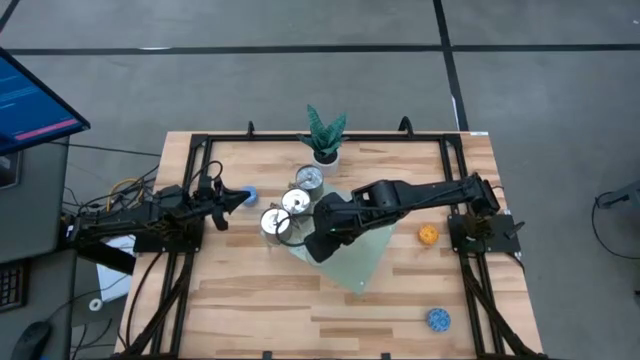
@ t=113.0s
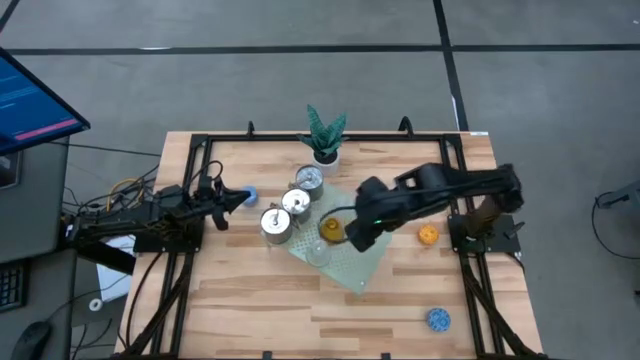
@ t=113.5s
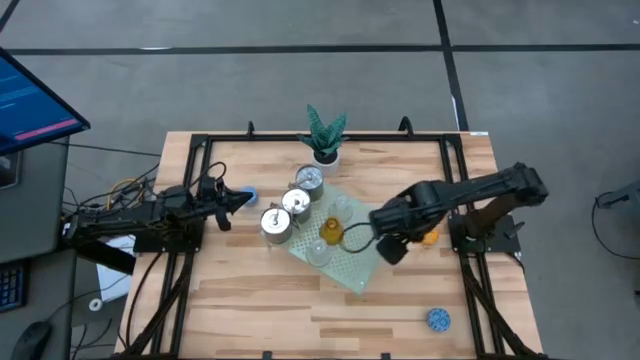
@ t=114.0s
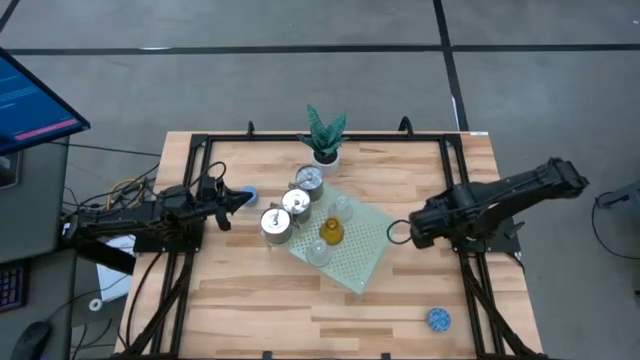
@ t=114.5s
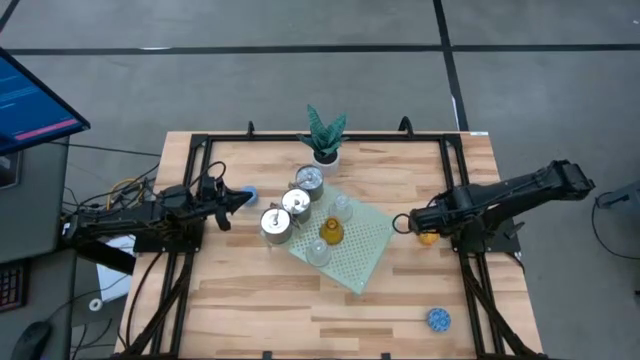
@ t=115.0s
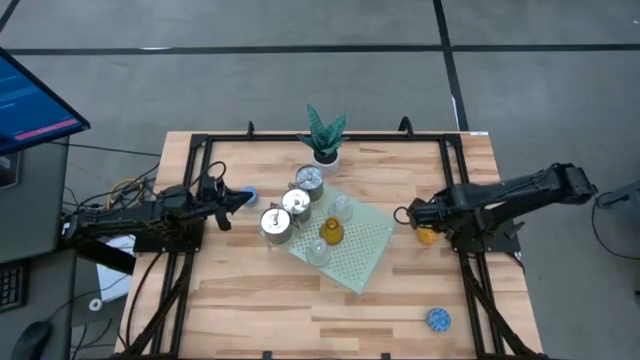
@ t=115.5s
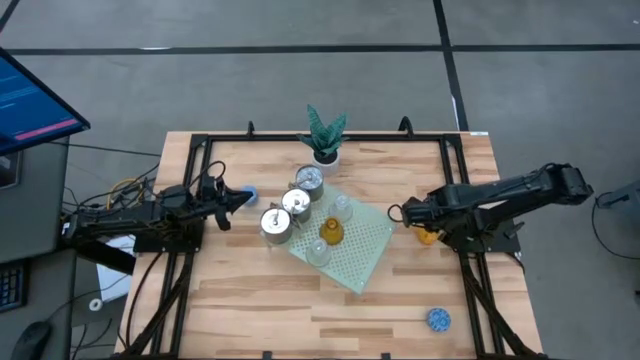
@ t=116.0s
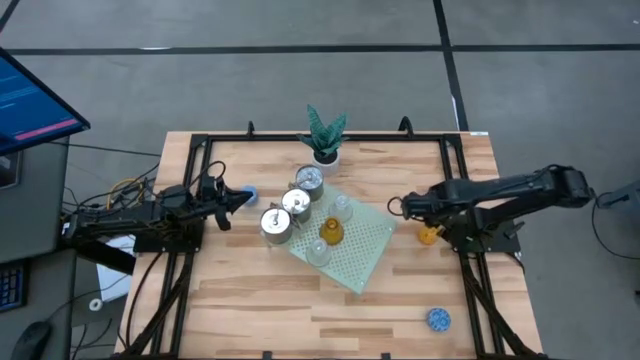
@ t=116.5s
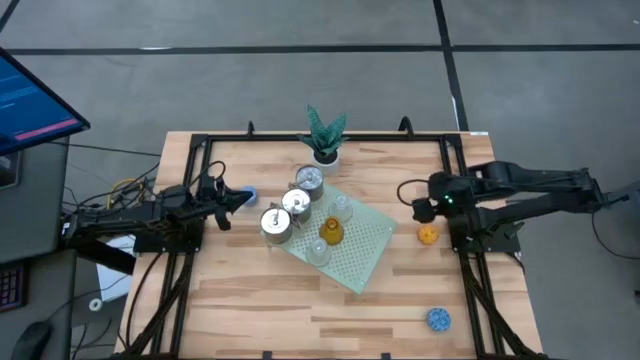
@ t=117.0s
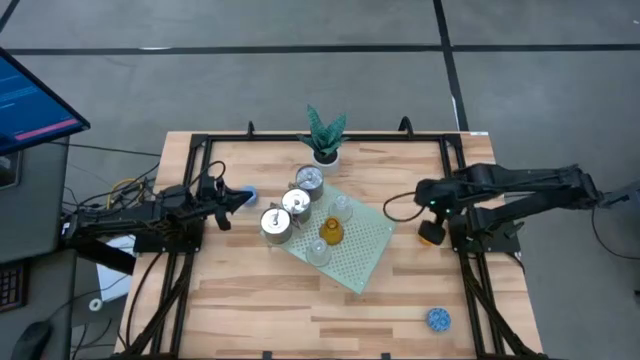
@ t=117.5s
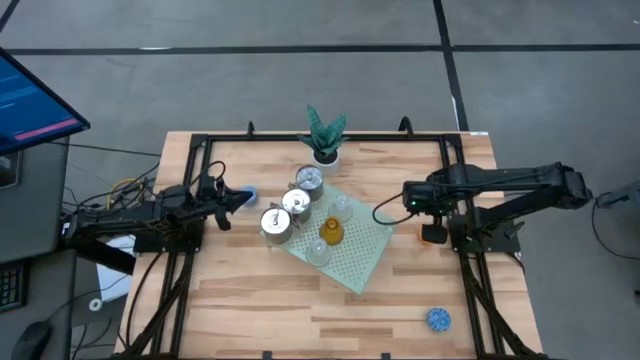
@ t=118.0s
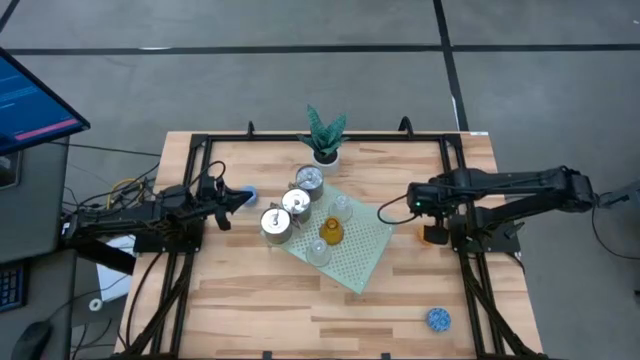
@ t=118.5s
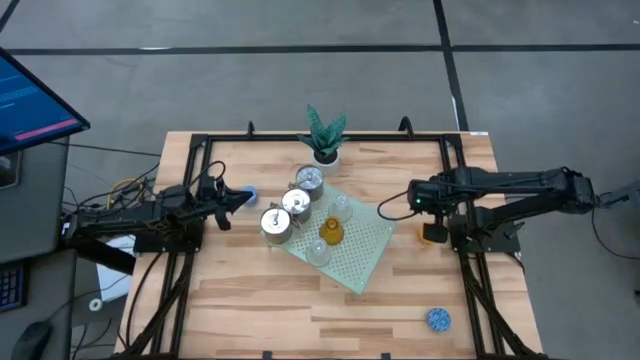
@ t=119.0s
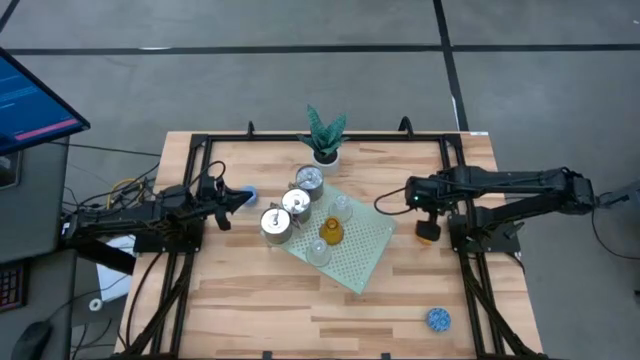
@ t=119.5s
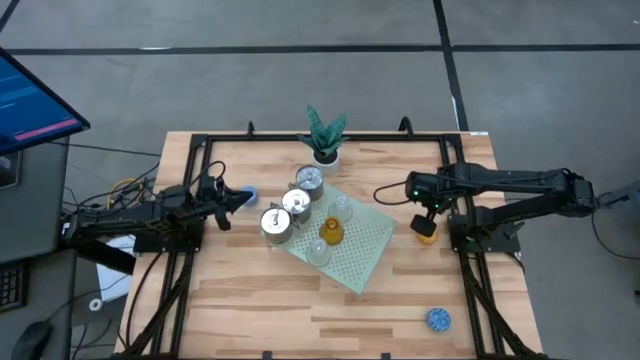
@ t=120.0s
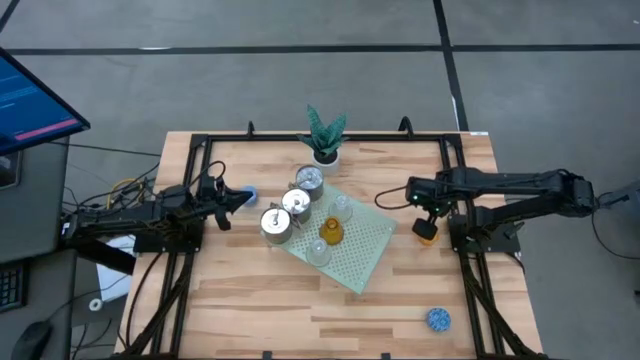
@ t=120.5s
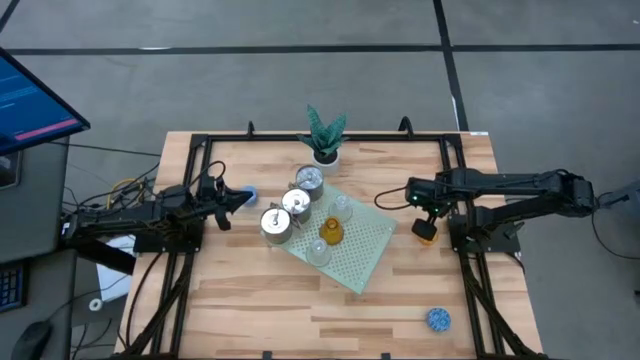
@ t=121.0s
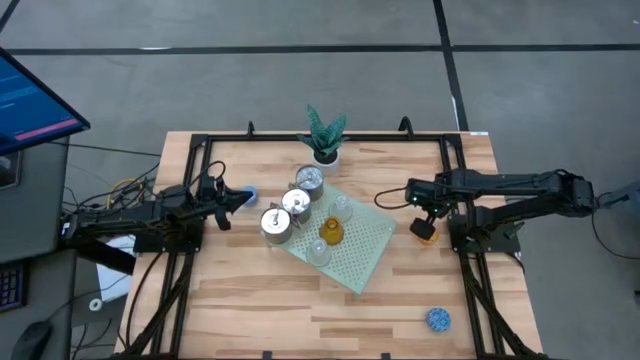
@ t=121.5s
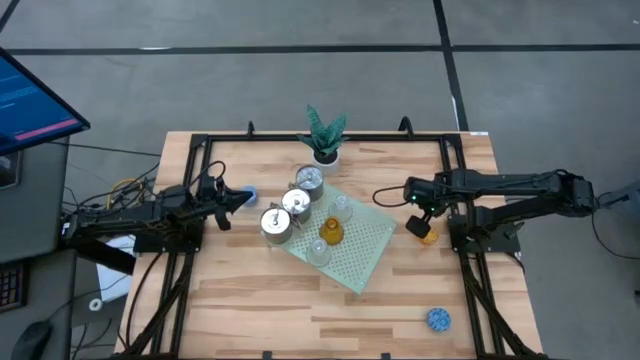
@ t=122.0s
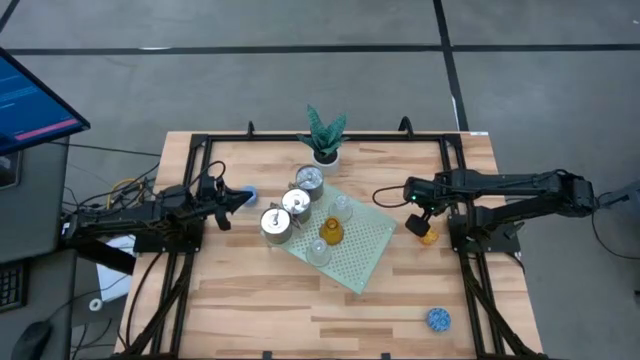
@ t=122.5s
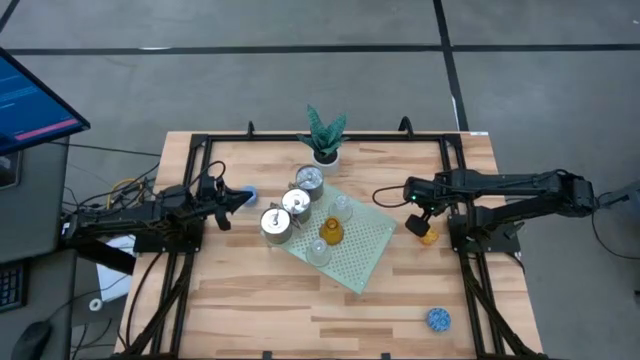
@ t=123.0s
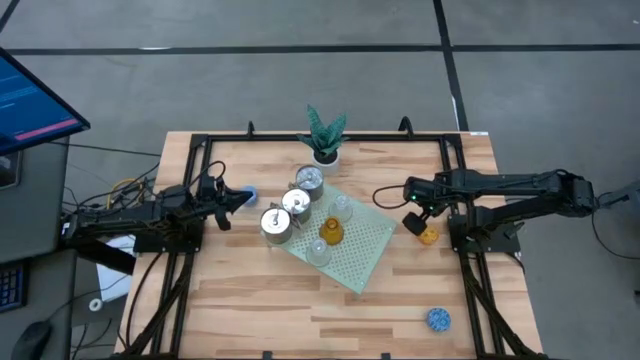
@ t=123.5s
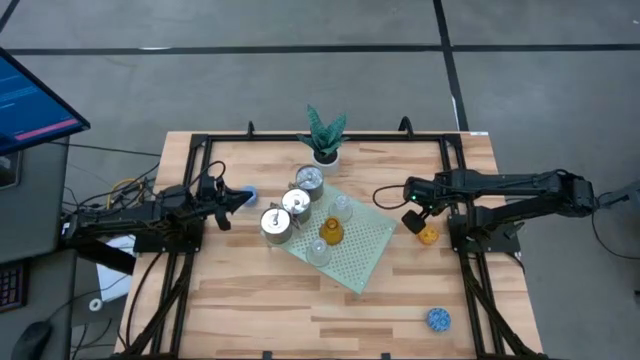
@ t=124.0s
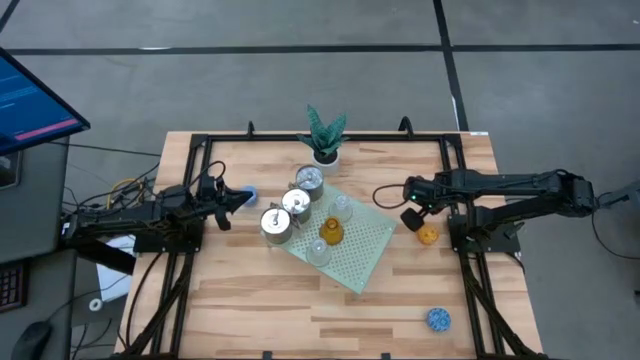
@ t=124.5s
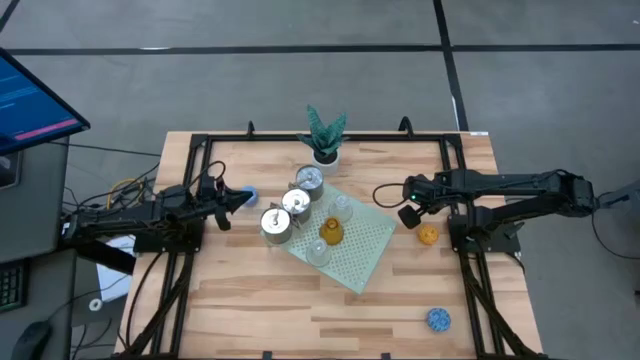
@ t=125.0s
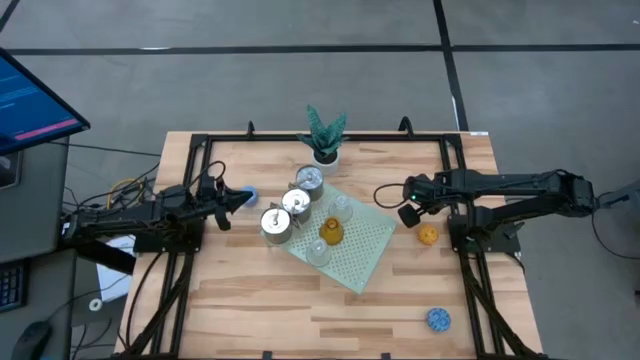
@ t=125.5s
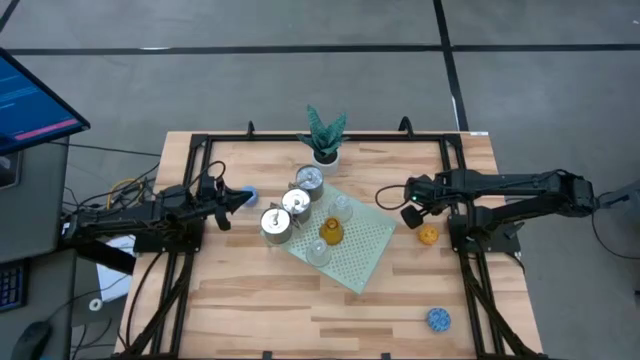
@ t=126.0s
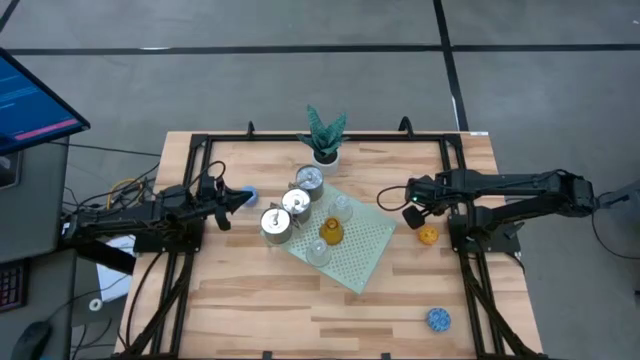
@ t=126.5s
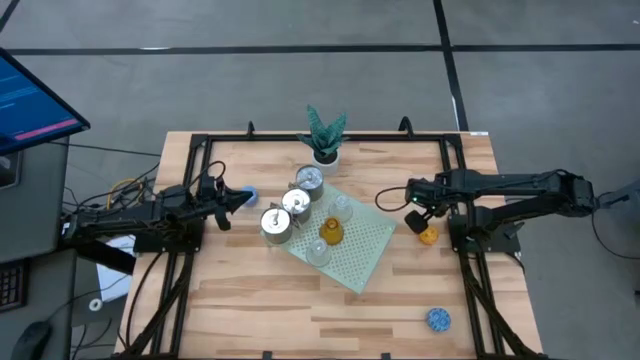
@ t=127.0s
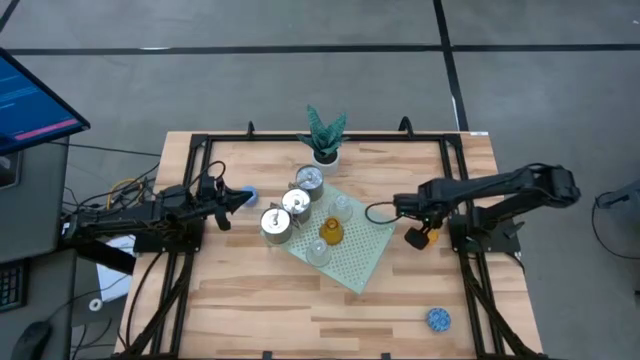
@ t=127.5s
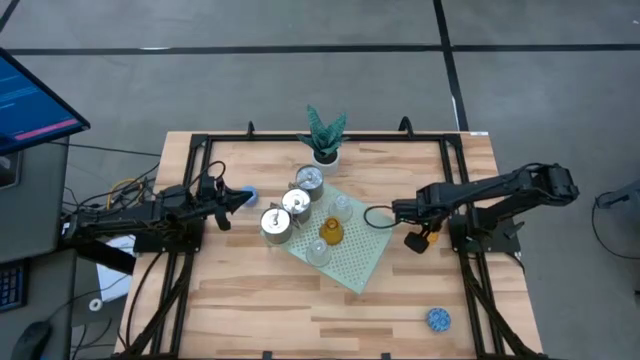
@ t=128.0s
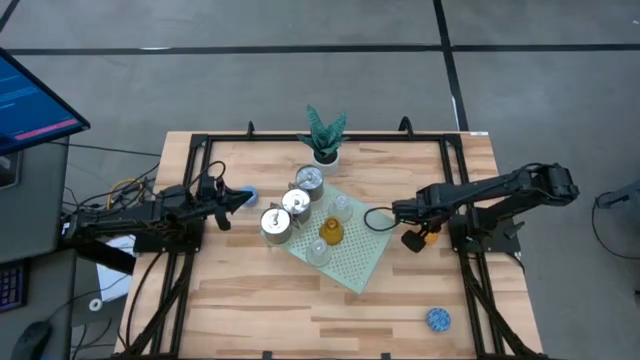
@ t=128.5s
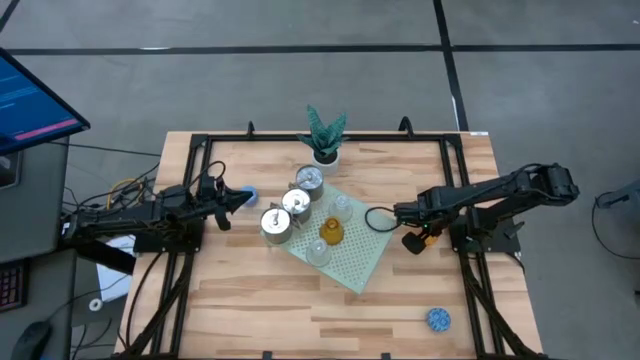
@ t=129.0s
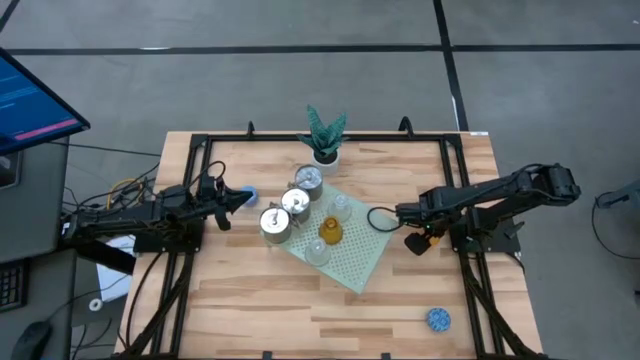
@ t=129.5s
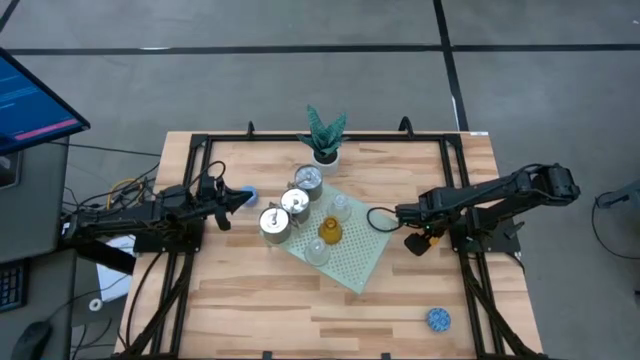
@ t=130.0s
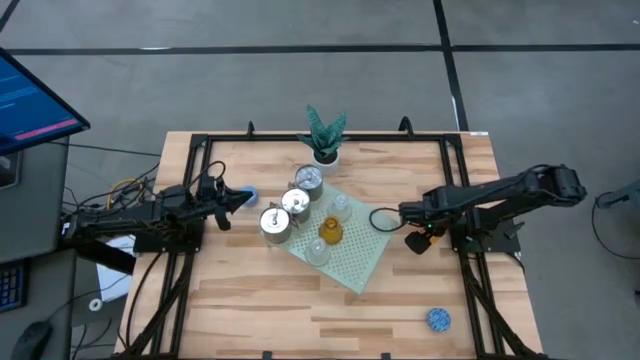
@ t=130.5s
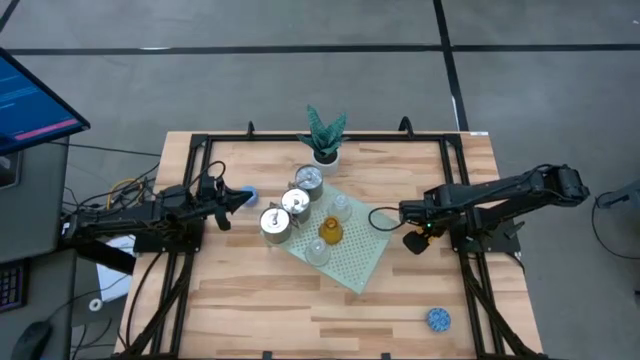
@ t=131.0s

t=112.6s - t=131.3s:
Task: Pick & Place candle stick holders
Put the yellow scented candle on the shelf

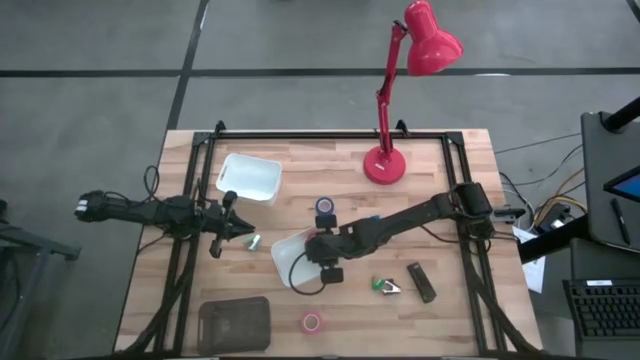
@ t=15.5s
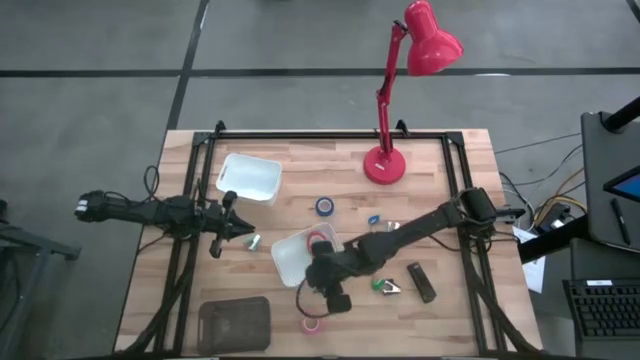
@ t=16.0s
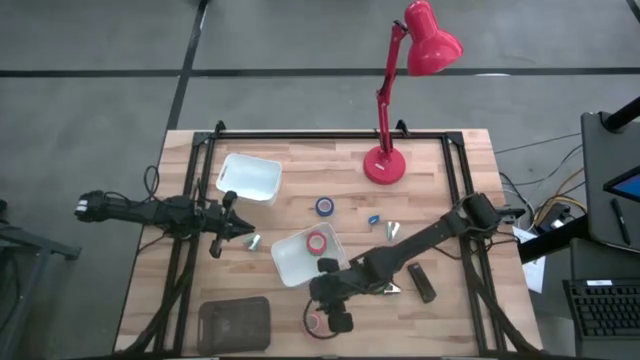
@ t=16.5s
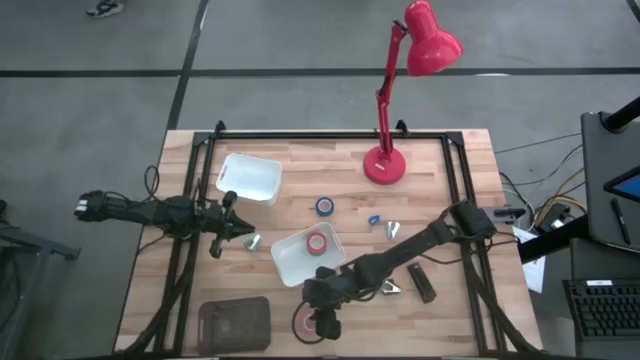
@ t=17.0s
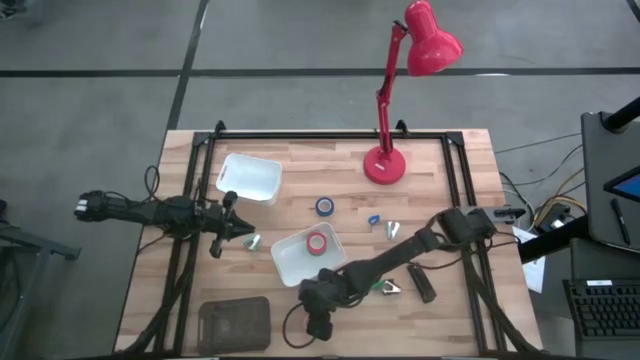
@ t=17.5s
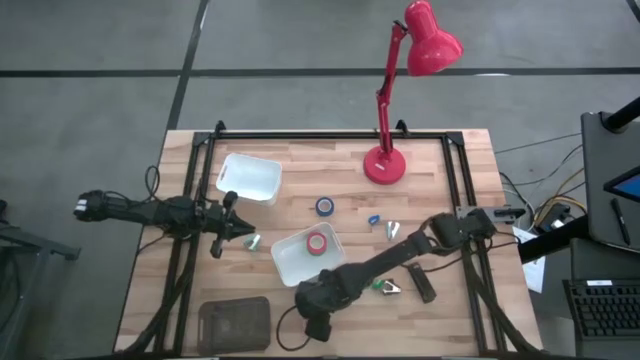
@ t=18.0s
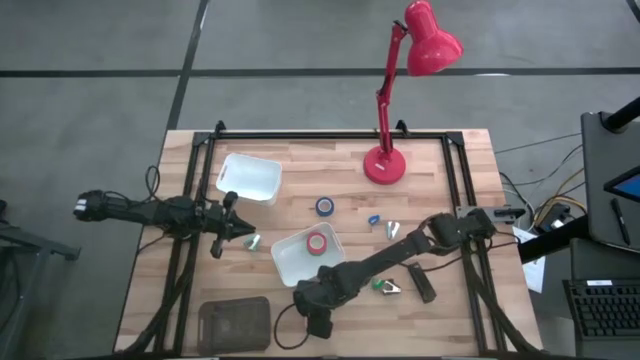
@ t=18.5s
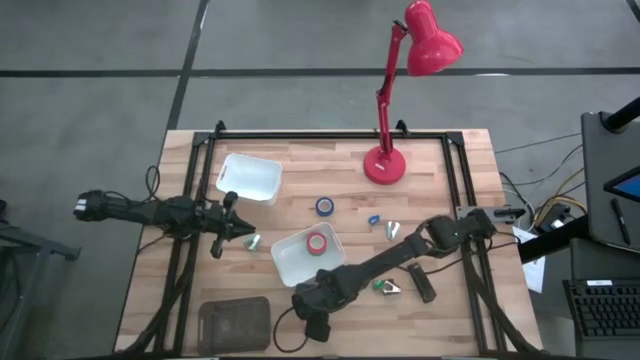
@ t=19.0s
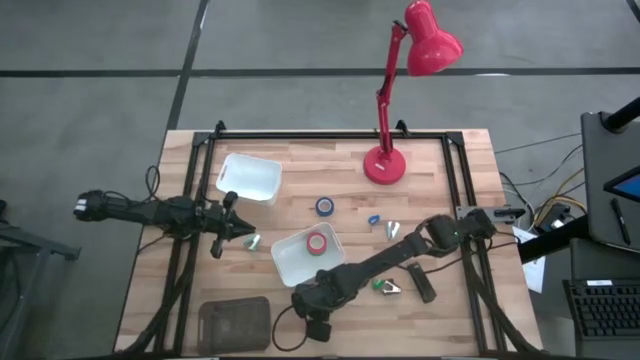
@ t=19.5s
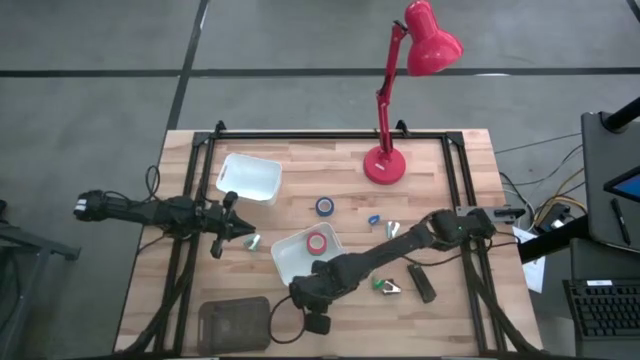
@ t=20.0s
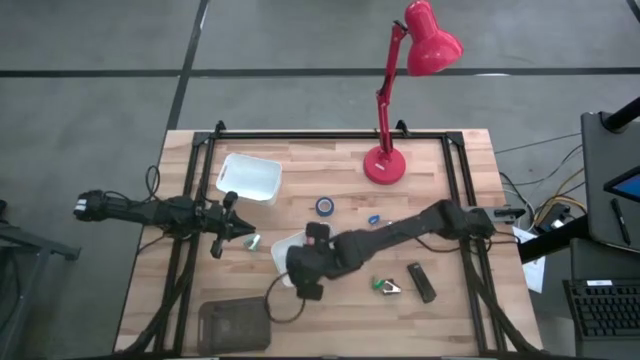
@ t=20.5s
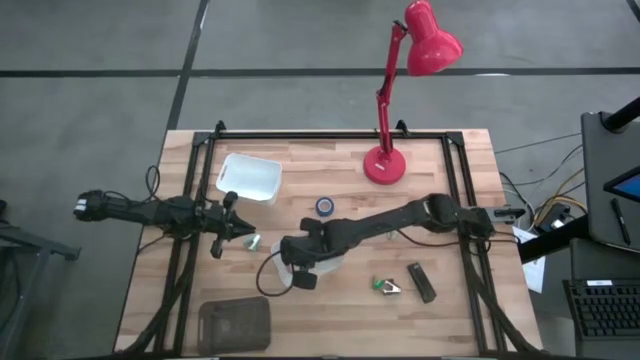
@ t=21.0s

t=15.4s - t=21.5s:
Task: Pick and place Stapler, Stapler remover, tape
Put the pink tape into the bottom white bin
